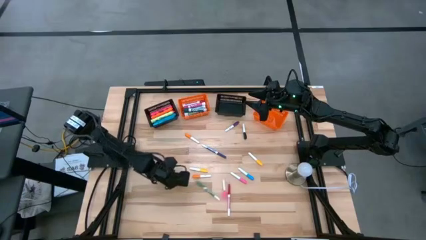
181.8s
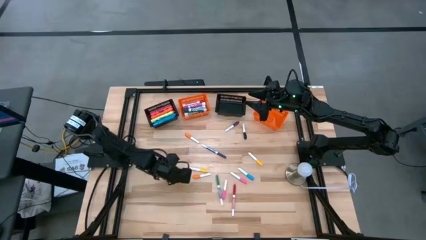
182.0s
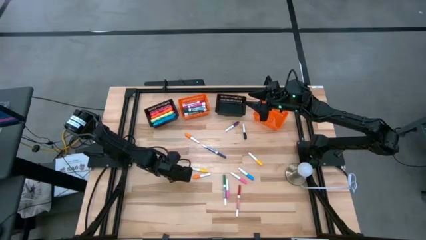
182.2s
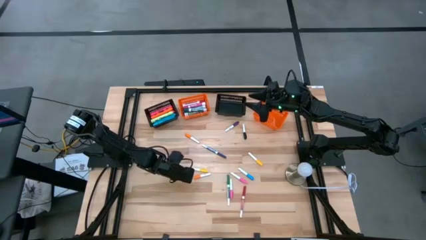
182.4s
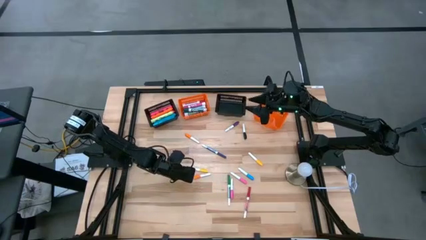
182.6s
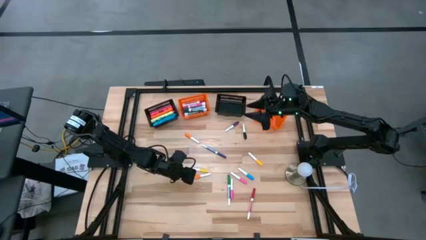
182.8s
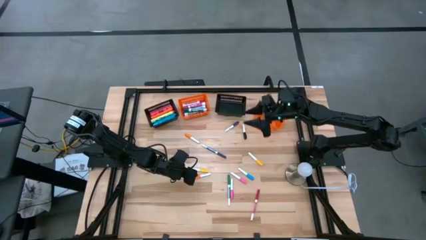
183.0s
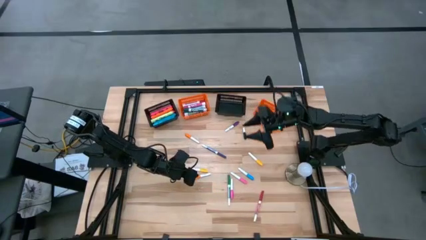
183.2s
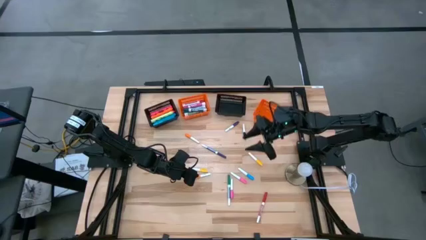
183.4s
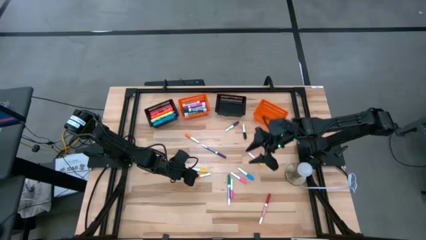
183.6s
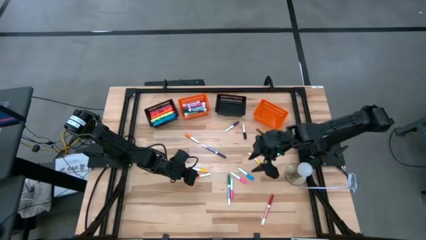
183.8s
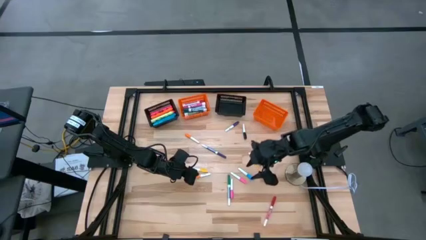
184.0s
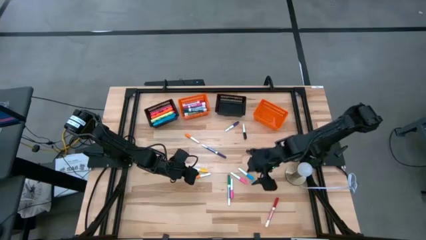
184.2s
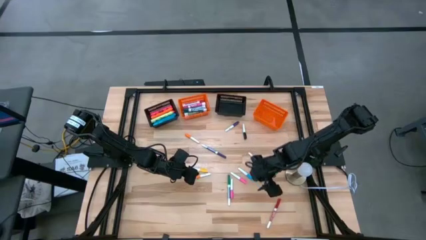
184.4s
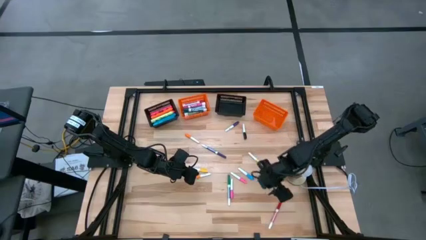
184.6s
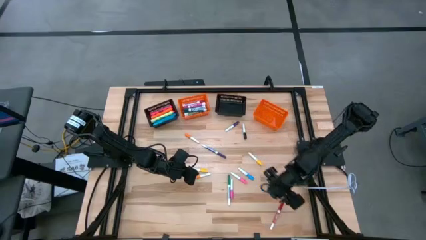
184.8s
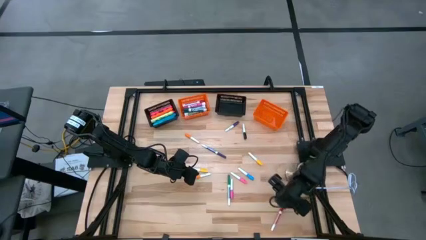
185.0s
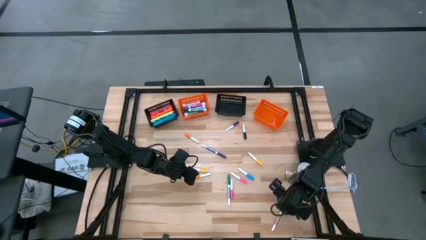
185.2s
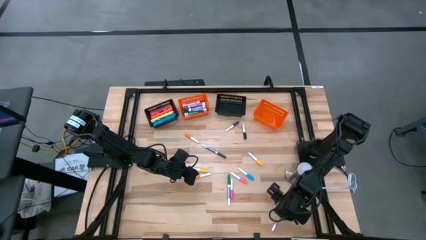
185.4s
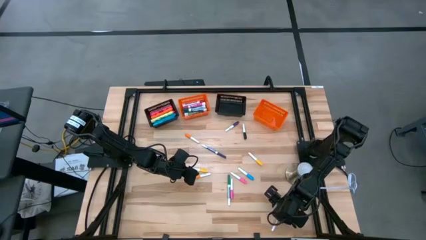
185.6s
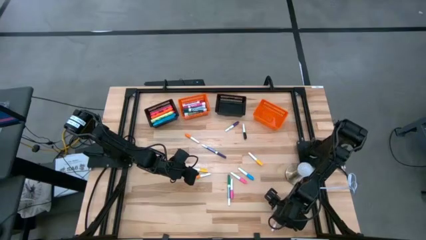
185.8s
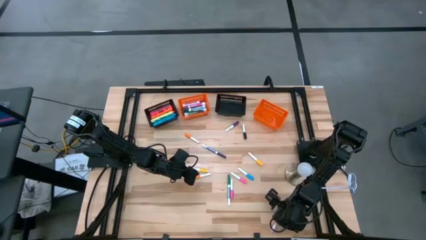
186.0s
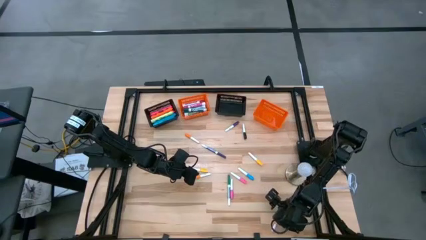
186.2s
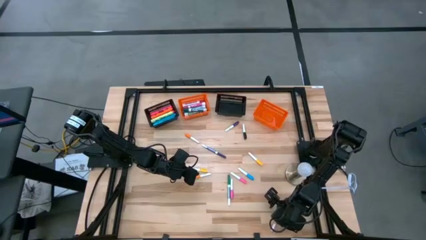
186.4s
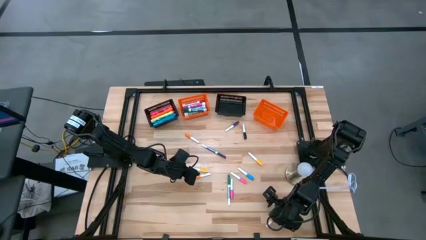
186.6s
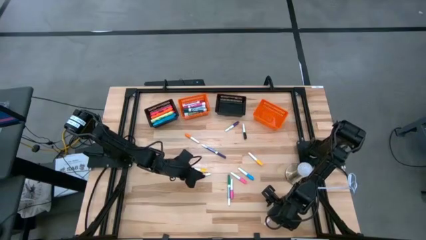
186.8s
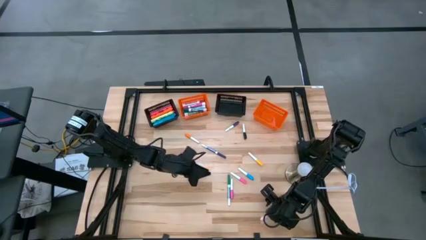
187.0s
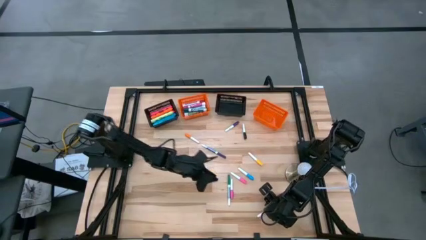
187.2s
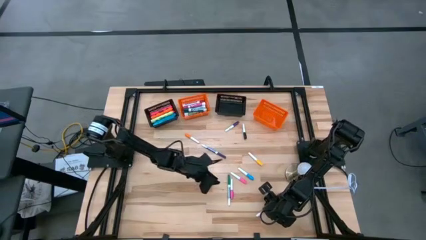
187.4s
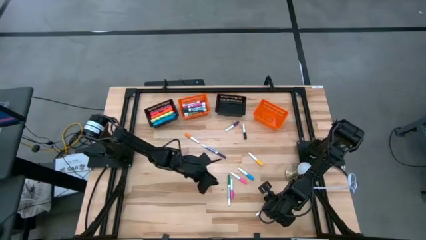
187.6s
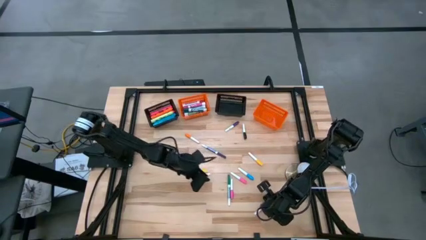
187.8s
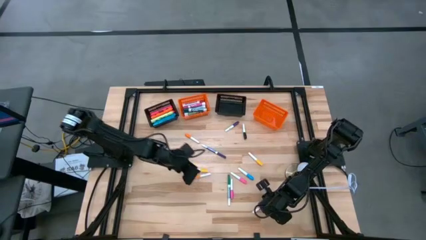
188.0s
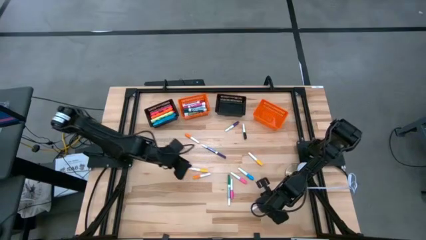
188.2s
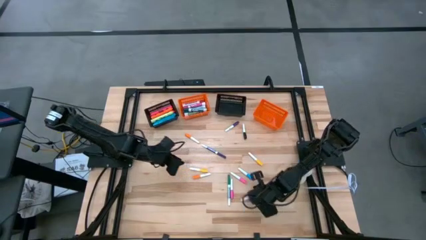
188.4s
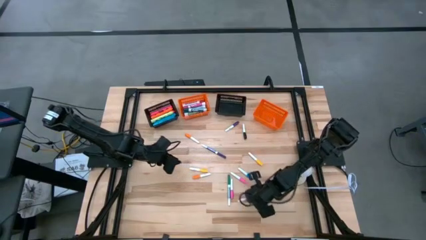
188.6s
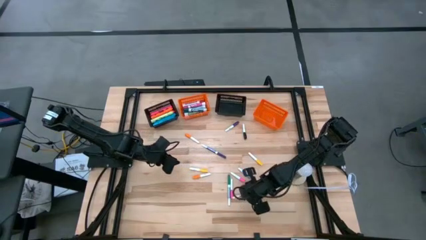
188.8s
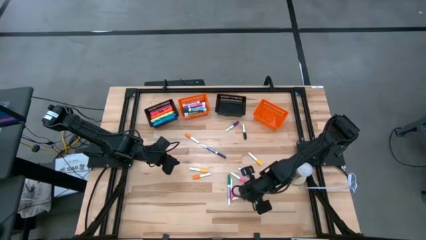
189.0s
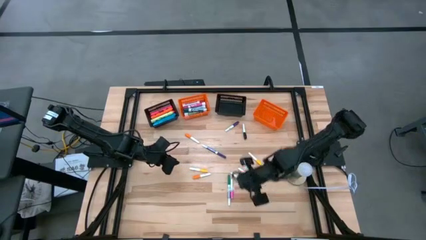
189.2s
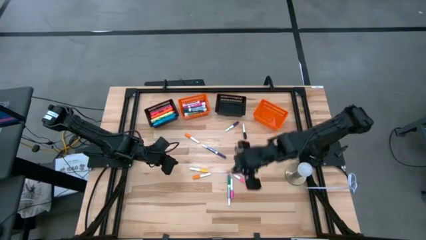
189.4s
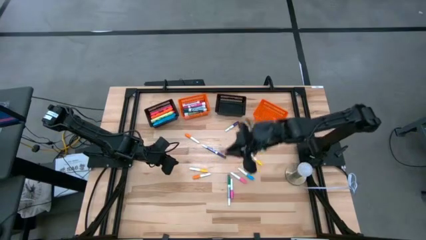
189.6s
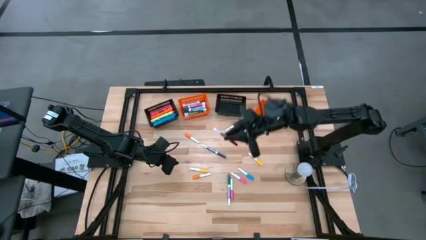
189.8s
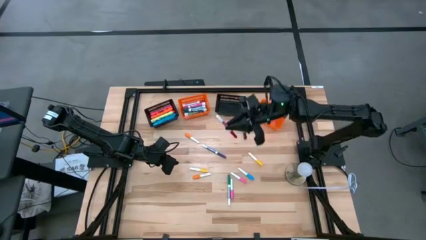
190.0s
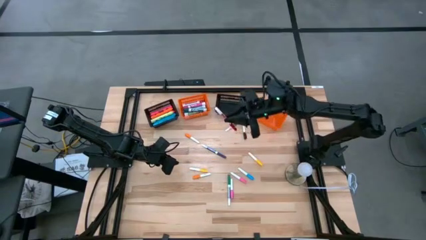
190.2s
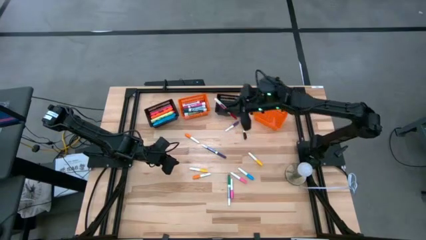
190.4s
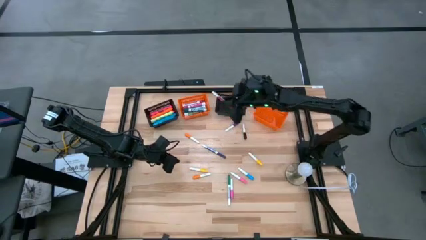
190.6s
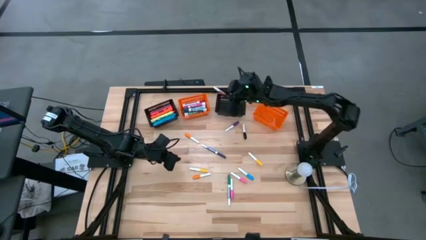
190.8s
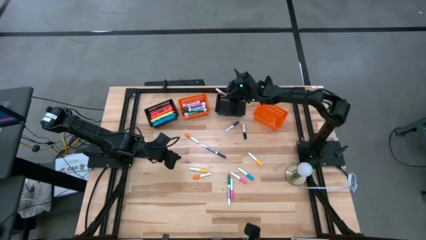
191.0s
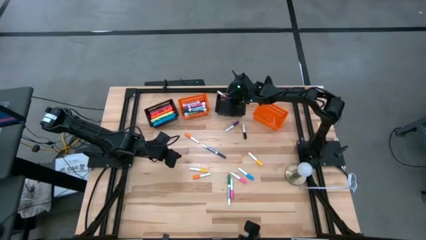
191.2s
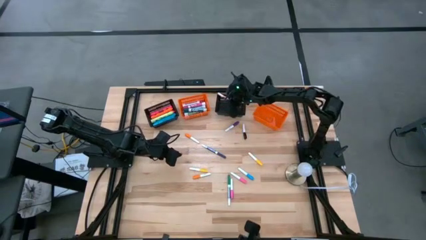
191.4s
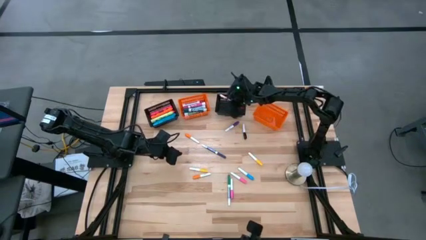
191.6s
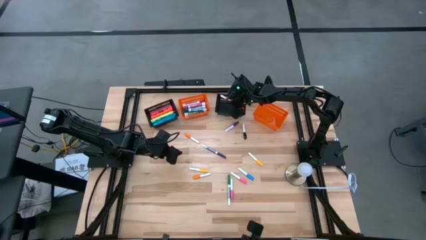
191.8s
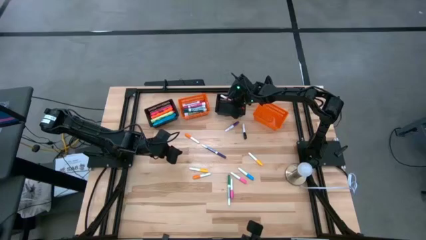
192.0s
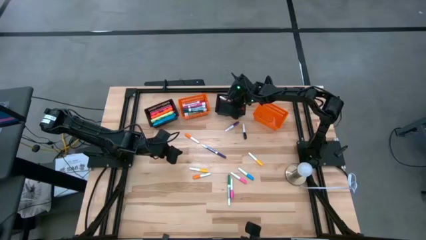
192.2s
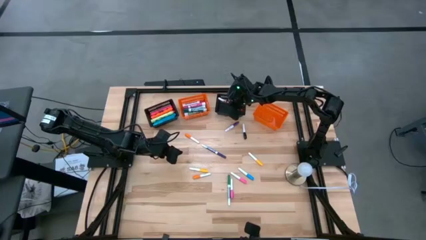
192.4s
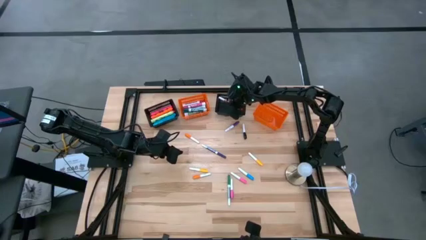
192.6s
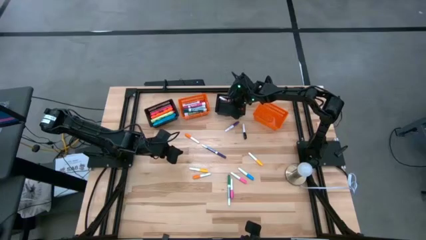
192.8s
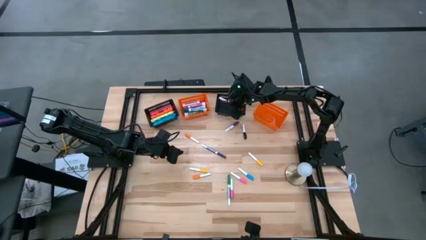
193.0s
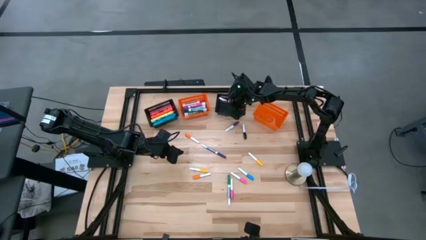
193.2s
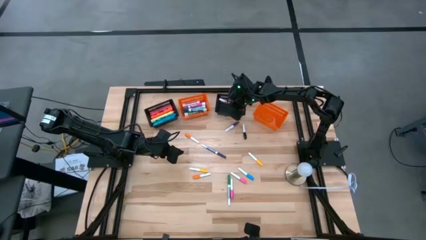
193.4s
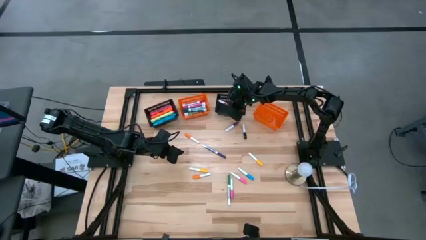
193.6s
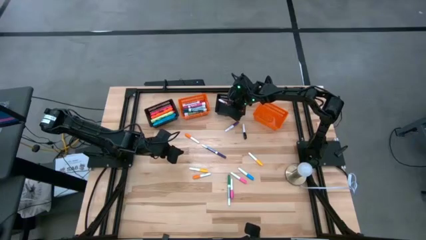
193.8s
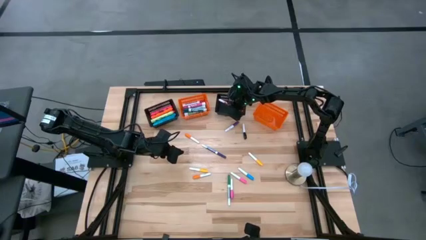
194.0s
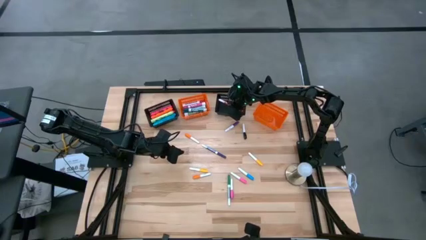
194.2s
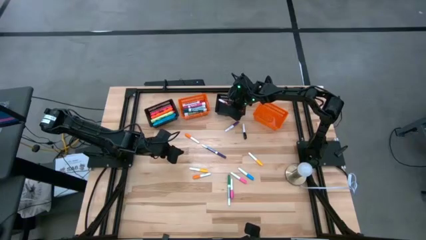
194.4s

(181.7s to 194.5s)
Task: Pick & Place Markers
Put the small red marker pen into the right black bin

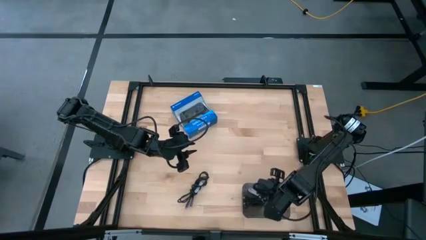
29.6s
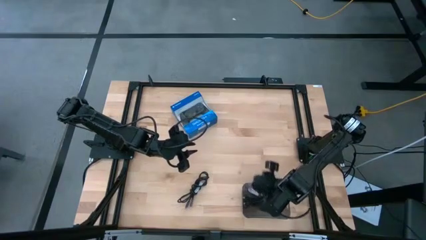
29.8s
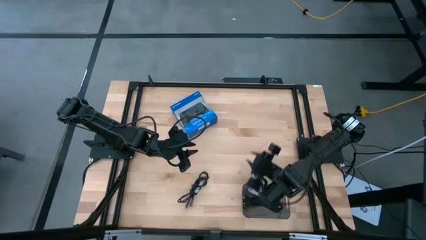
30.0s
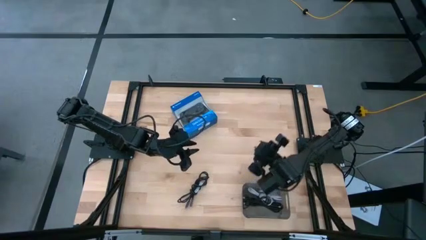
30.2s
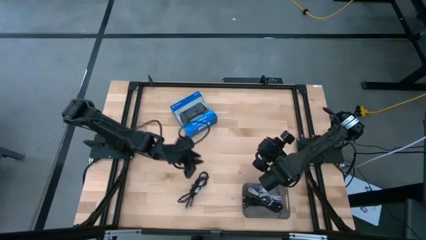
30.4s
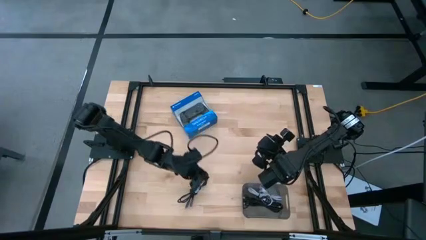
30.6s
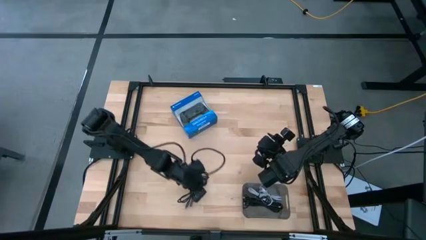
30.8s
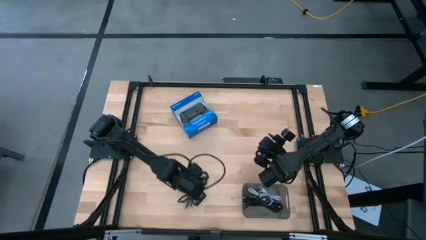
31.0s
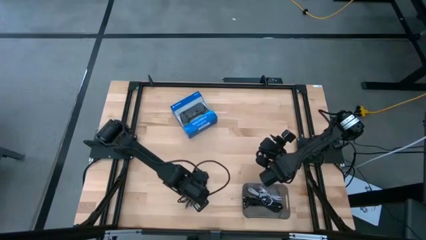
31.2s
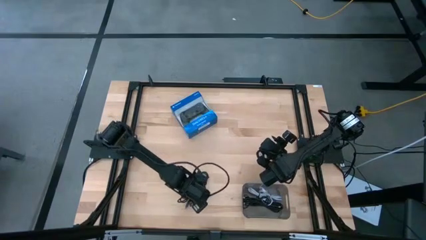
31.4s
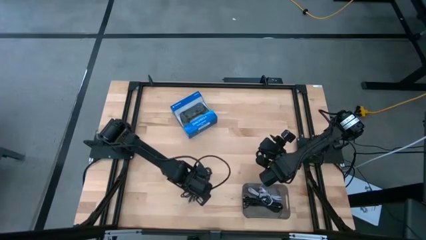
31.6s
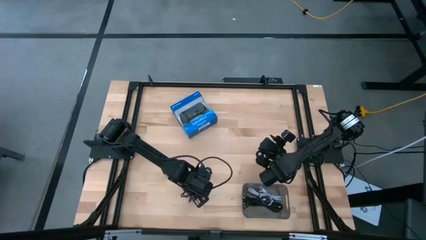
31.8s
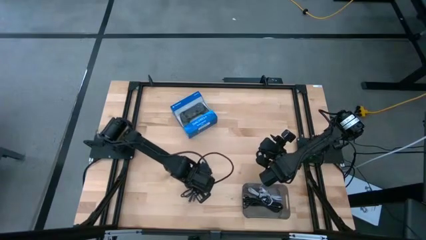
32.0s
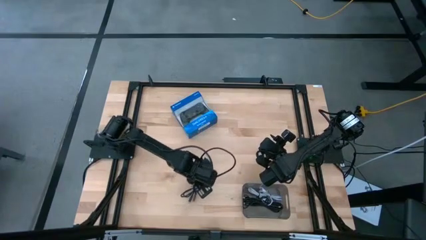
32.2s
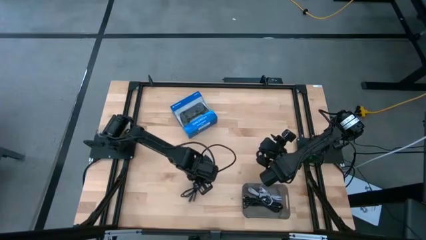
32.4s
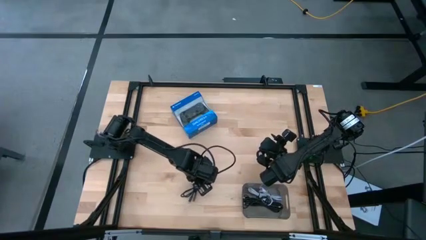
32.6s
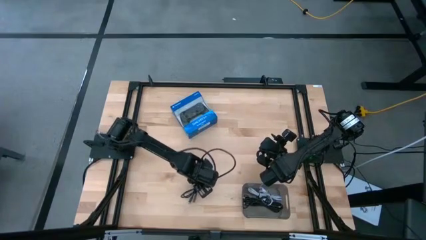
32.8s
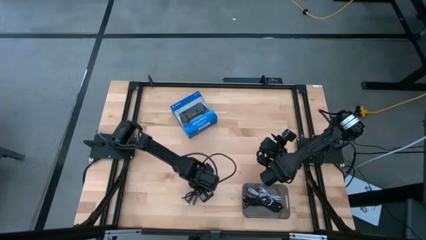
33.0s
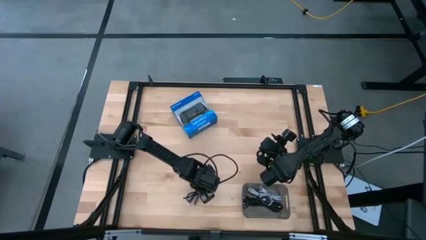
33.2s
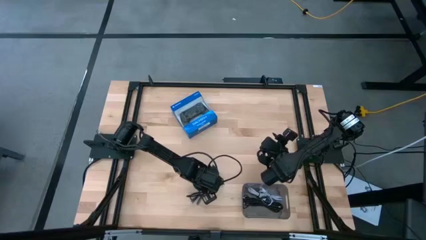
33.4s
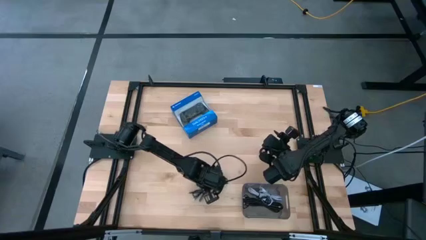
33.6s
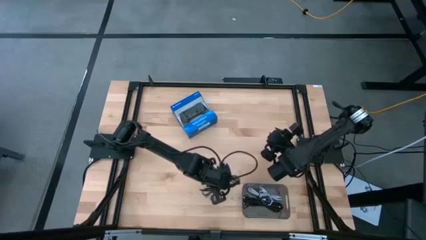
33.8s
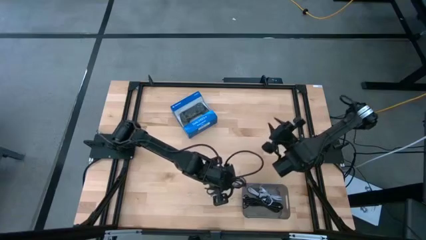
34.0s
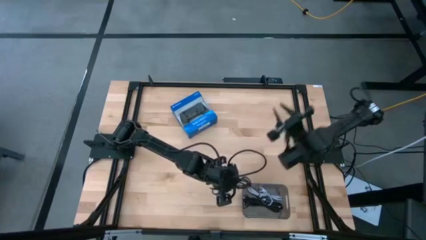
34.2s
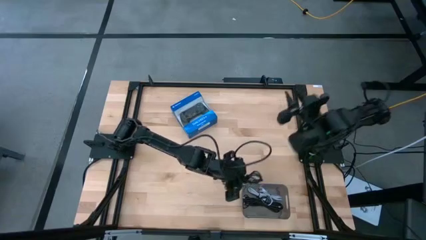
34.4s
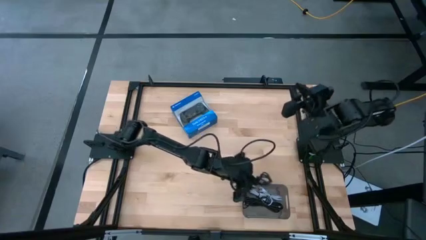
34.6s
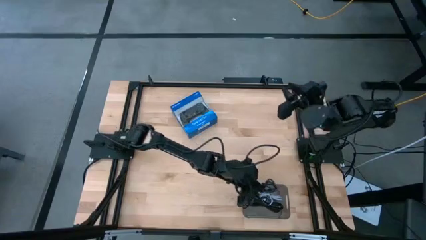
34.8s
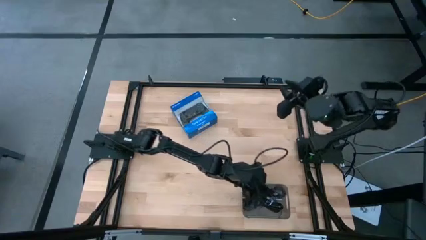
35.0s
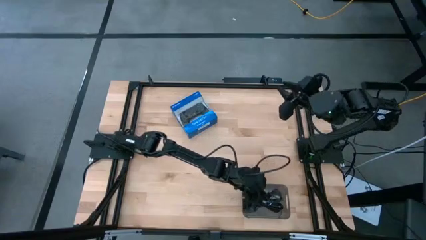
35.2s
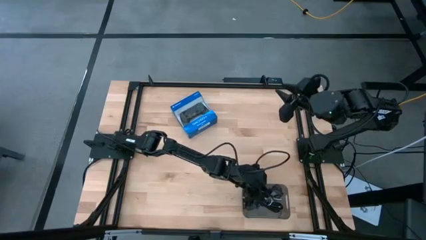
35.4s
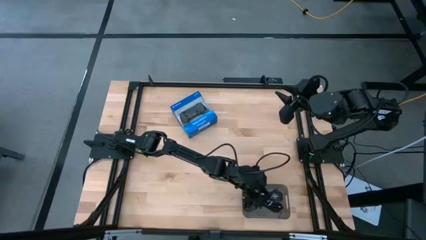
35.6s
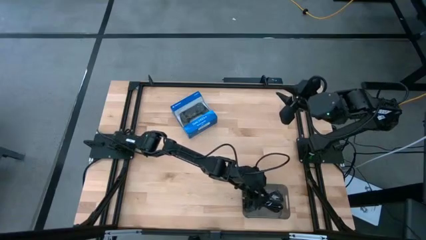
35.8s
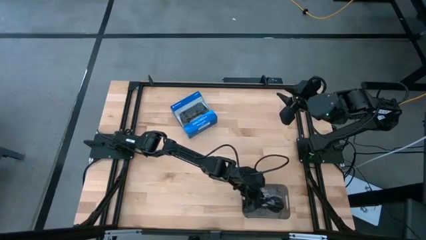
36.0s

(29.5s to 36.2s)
Task: Pick and place USB-C Cables
Put the black usb cable into the grey transparent bin
